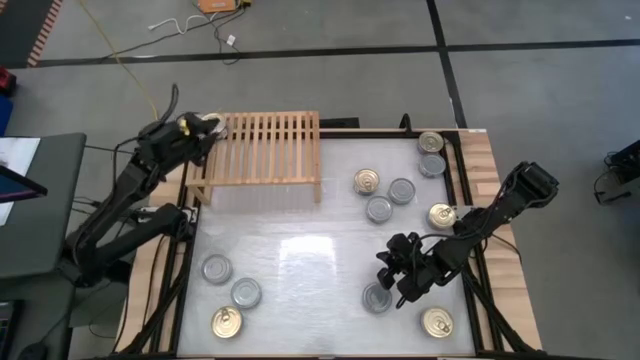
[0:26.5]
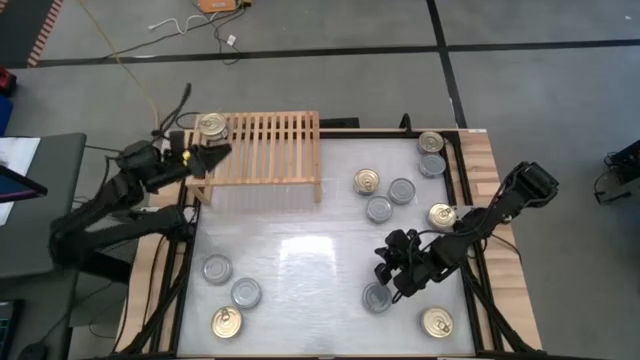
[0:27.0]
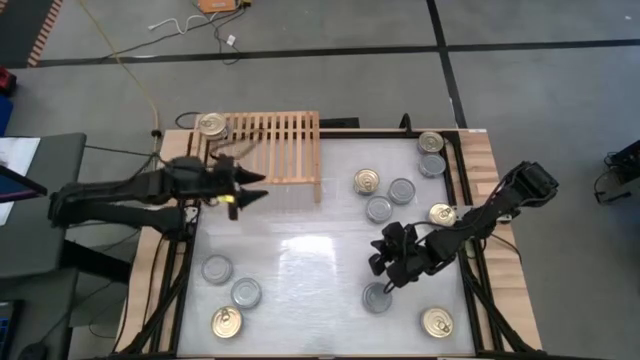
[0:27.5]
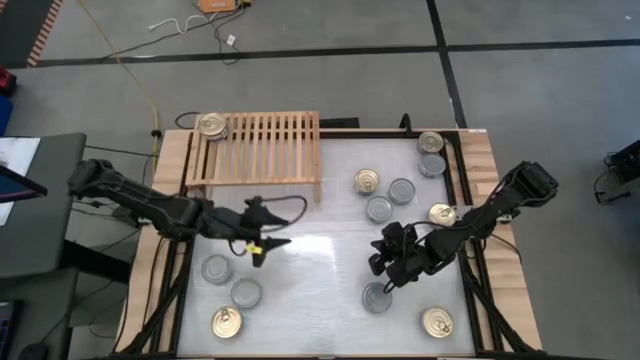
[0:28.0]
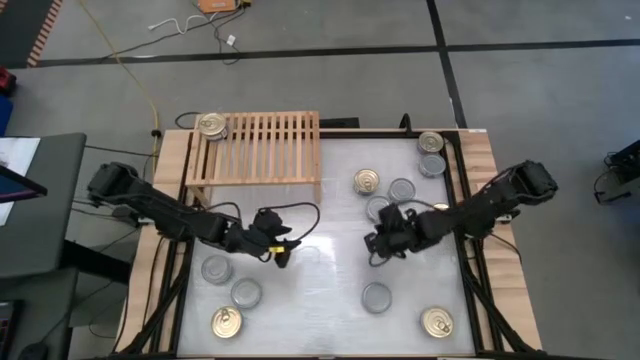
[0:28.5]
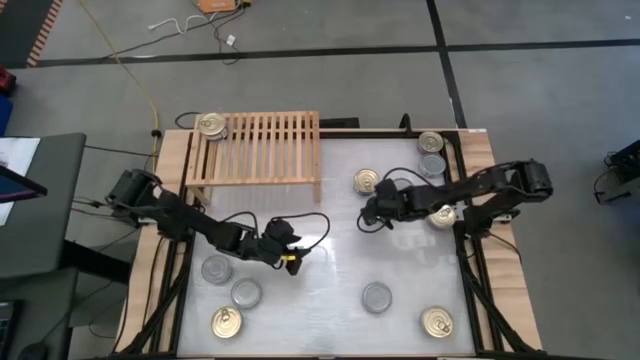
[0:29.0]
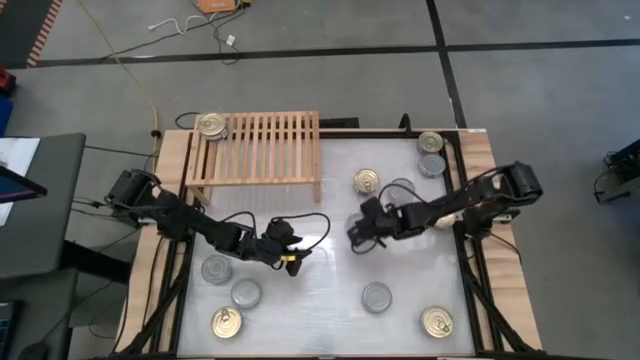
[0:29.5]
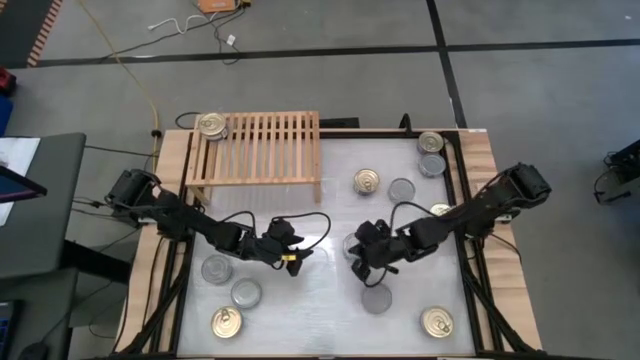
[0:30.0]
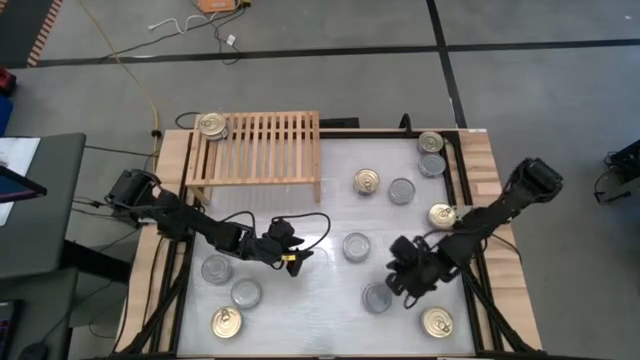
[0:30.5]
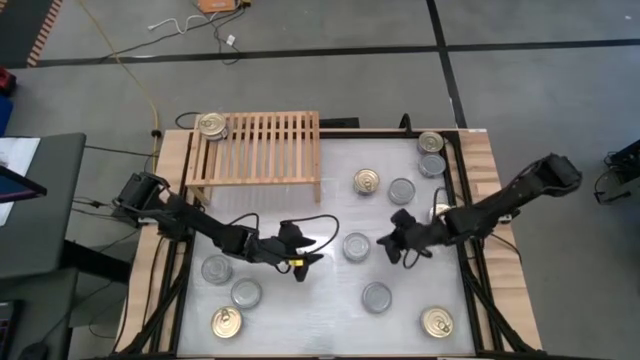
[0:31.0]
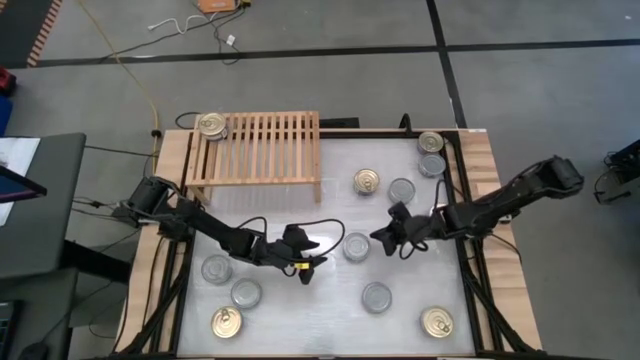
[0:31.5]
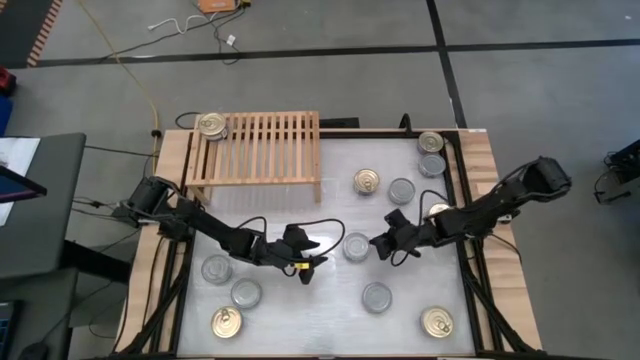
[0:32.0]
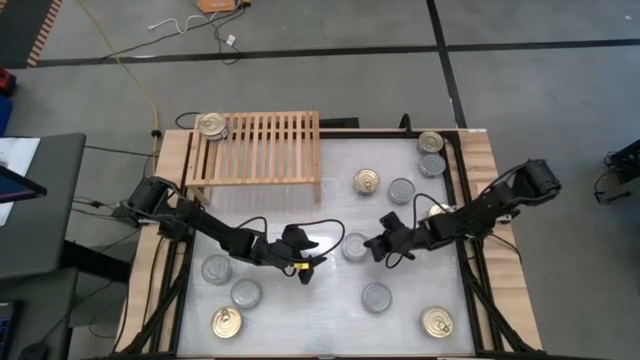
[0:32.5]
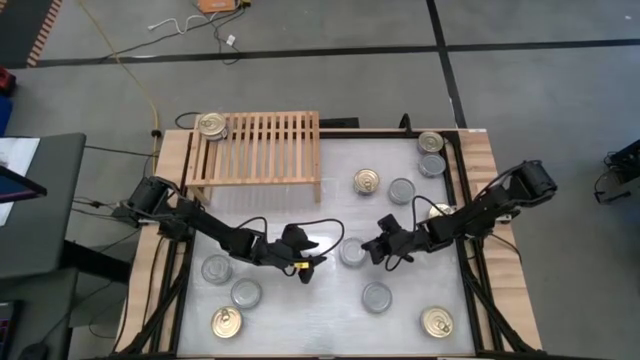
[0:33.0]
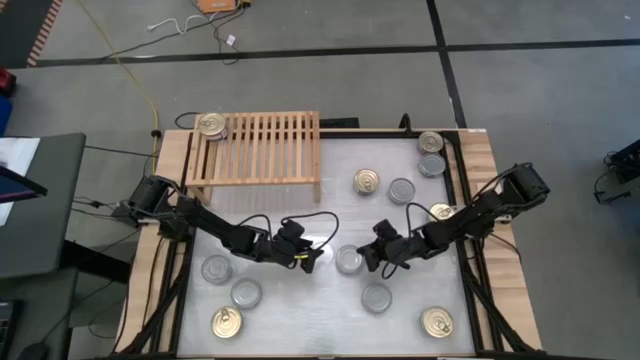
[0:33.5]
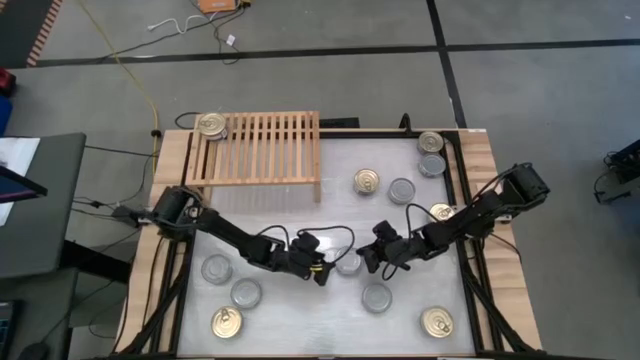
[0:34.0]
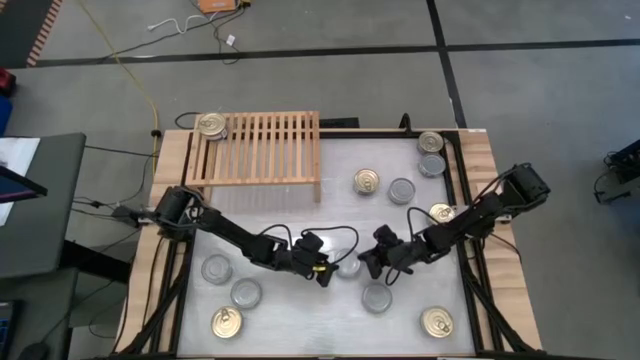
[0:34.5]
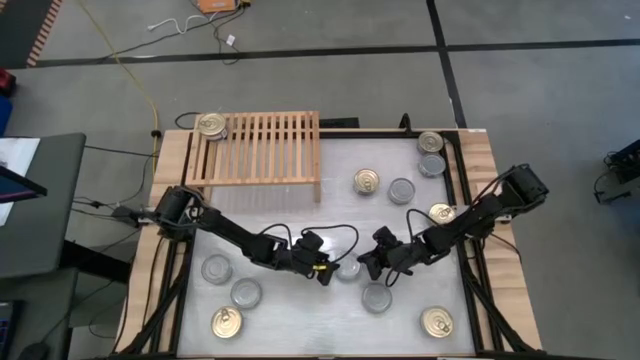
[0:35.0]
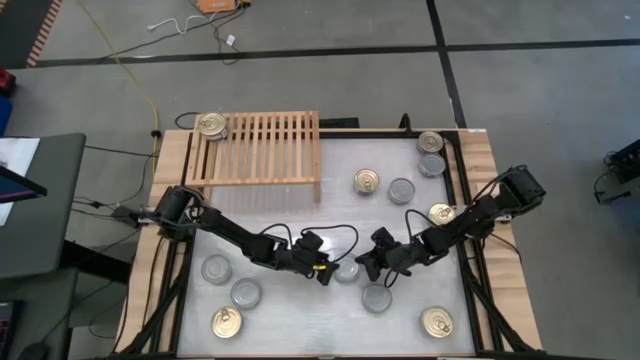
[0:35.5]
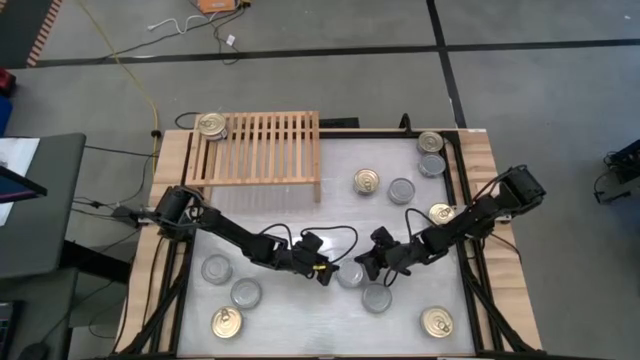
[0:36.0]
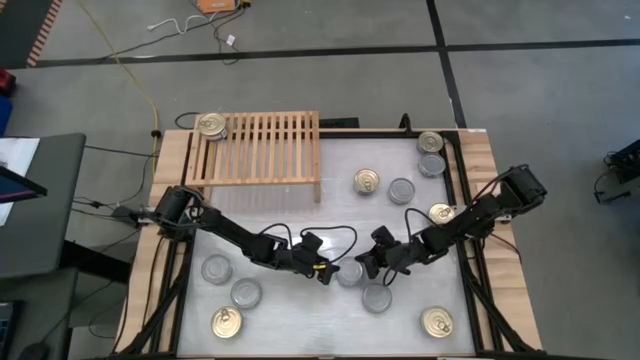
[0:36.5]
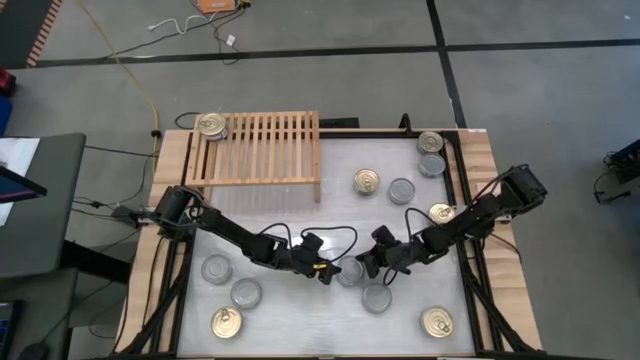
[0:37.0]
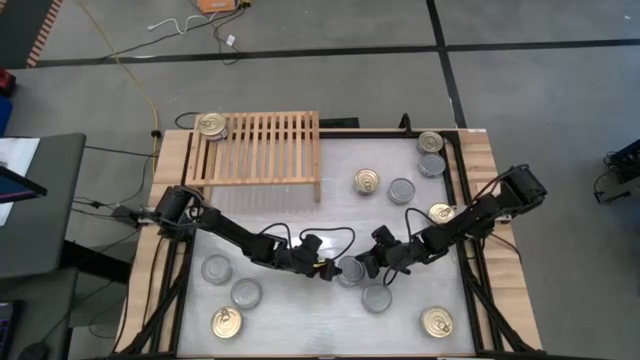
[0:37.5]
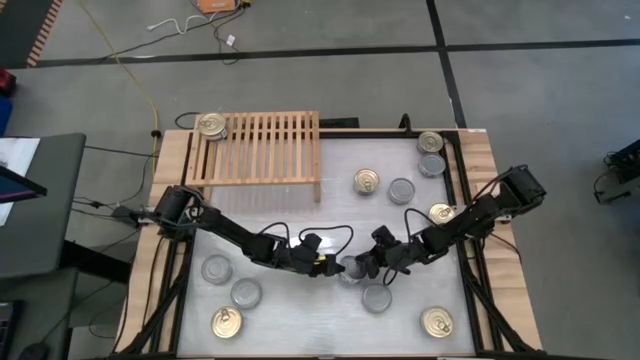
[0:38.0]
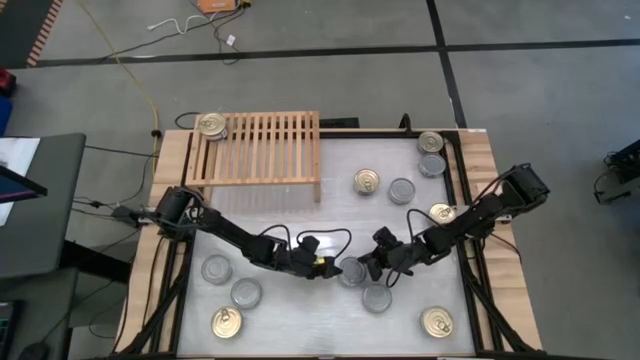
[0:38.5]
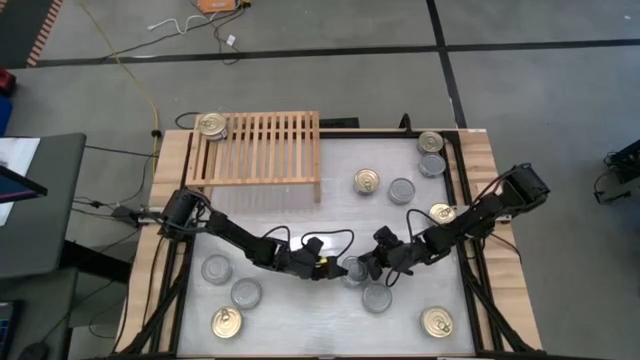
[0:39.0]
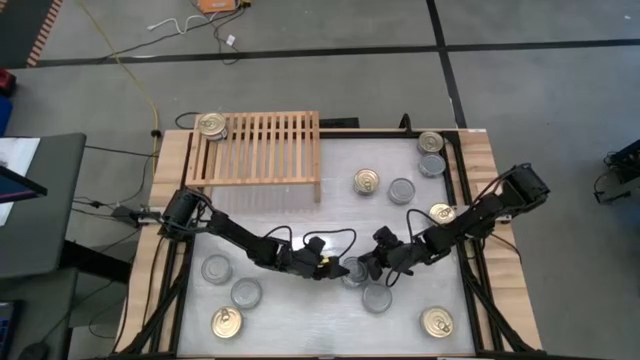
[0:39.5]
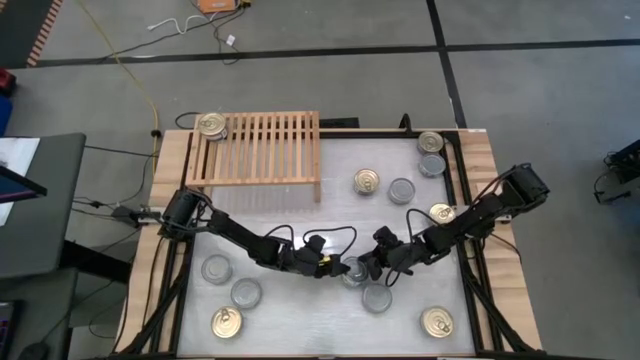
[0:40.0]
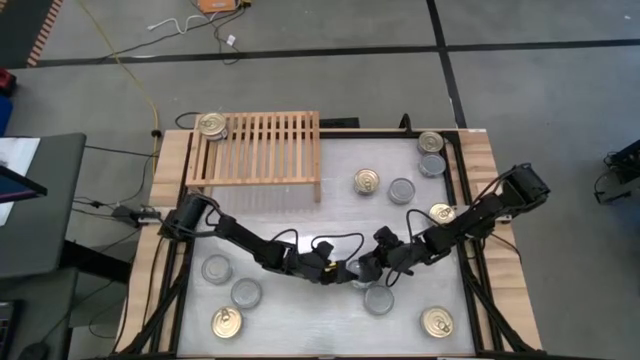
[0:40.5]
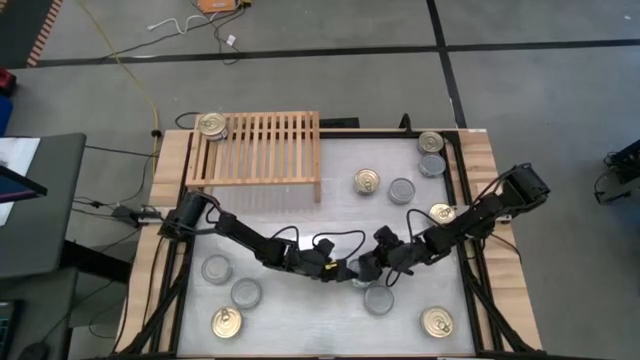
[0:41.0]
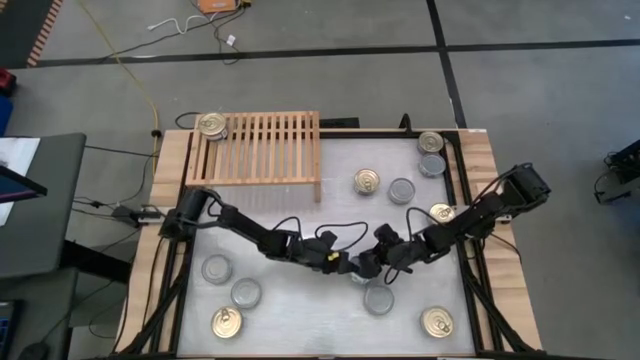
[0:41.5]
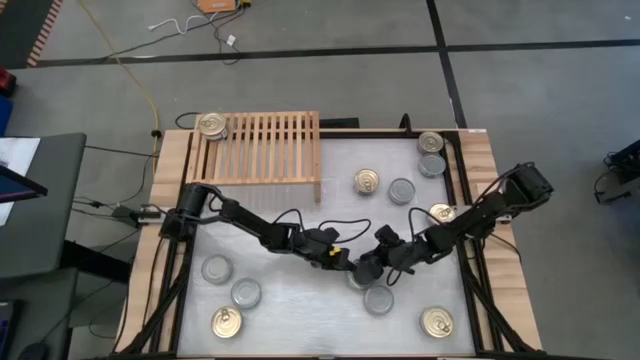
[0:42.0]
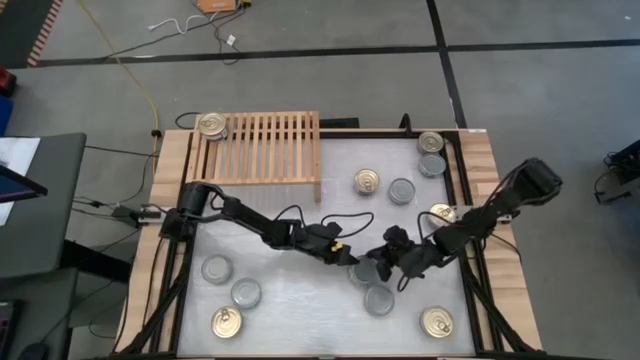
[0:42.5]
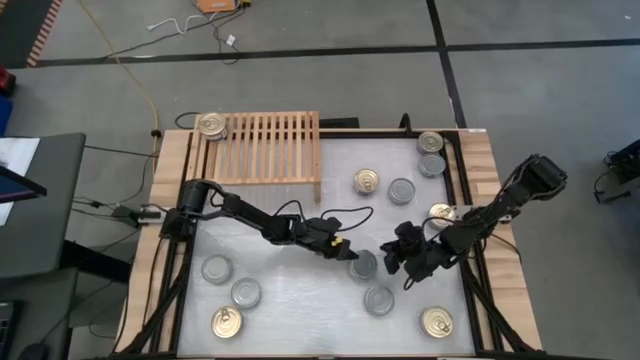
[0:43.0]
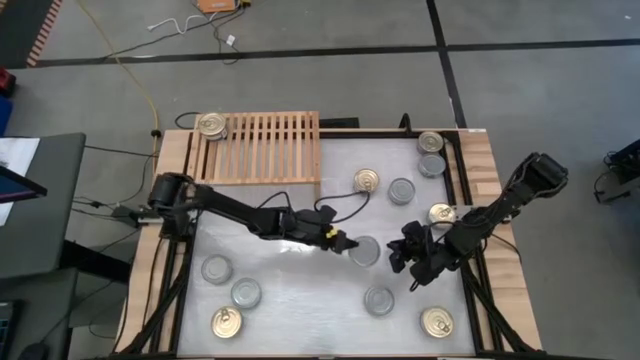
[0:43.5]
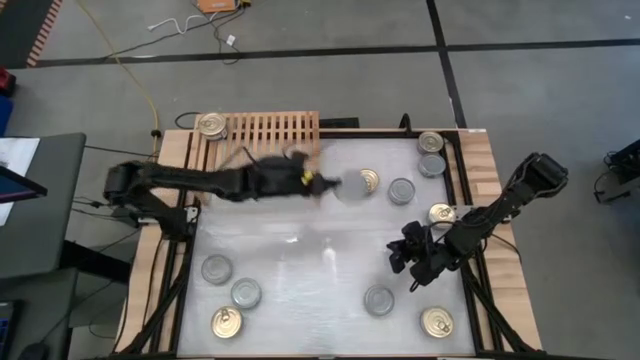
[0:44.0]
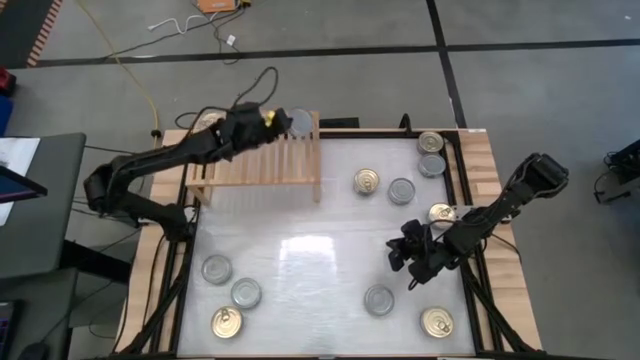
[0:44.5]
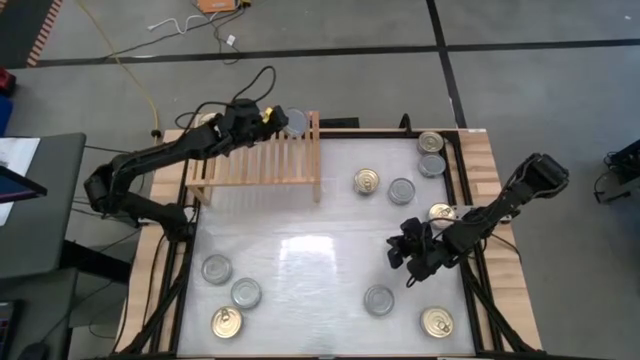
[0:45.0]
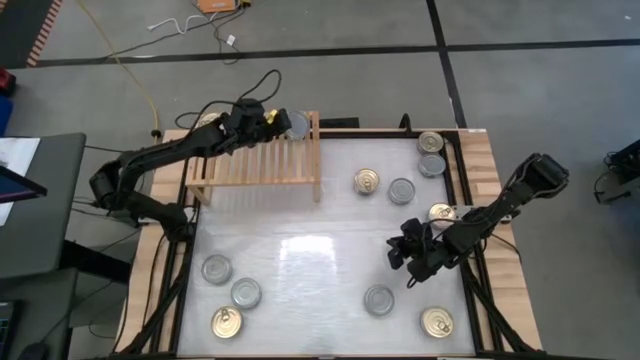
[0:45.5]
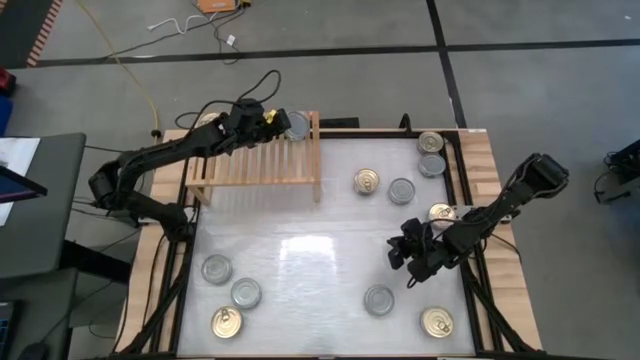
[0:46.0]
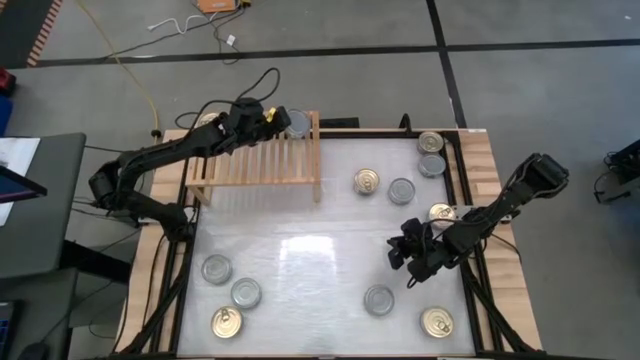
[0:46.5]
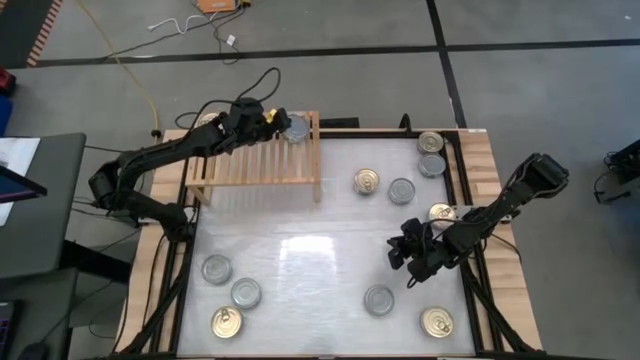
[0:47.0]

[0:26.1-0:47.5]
Task: Stack canned seafood by type on shelf
Put the green tuna can on the shelf
